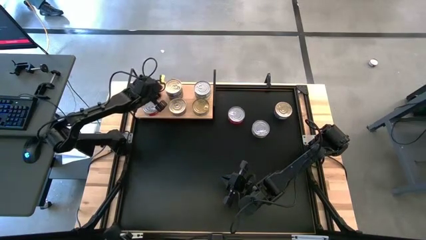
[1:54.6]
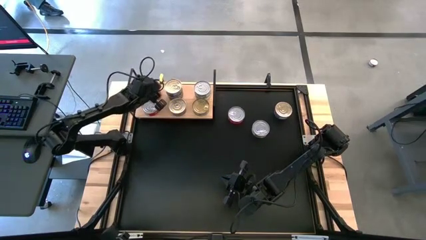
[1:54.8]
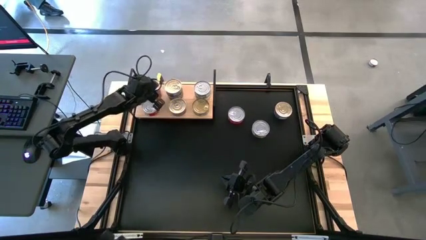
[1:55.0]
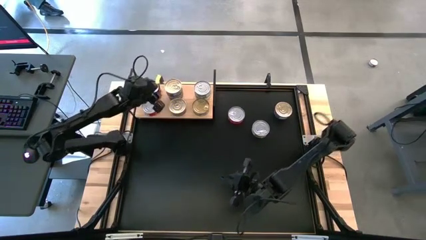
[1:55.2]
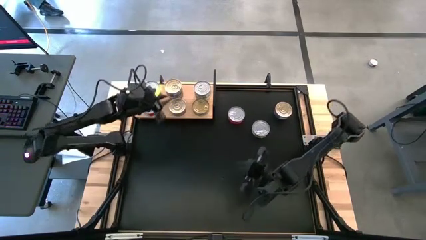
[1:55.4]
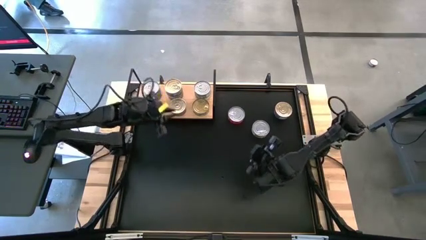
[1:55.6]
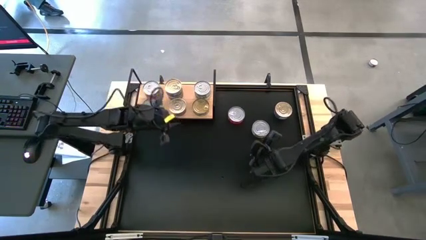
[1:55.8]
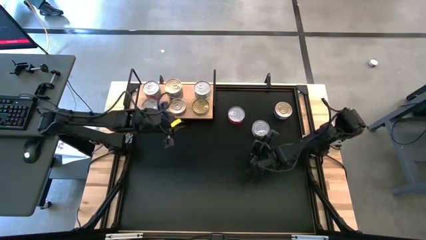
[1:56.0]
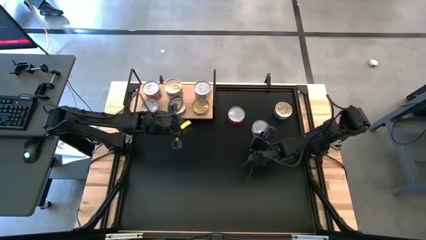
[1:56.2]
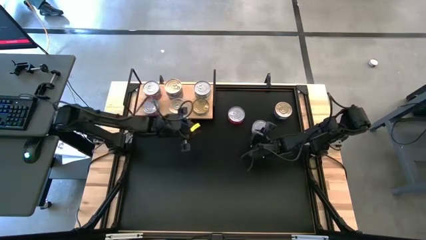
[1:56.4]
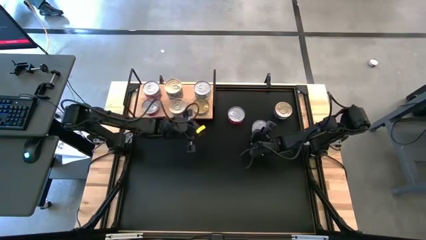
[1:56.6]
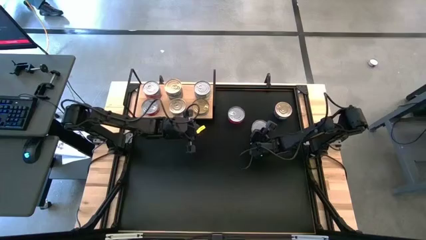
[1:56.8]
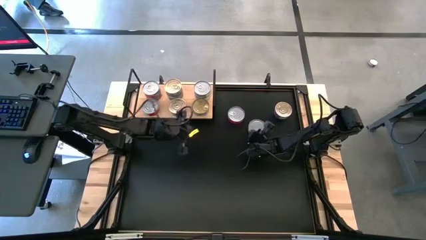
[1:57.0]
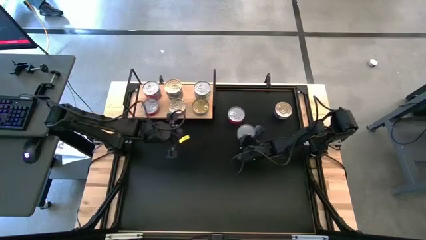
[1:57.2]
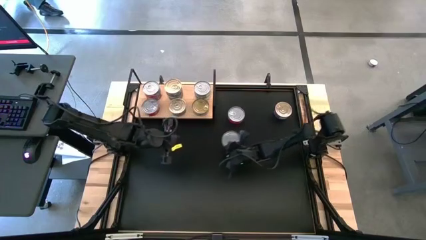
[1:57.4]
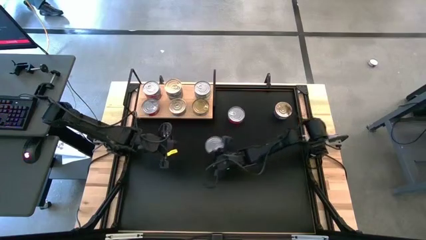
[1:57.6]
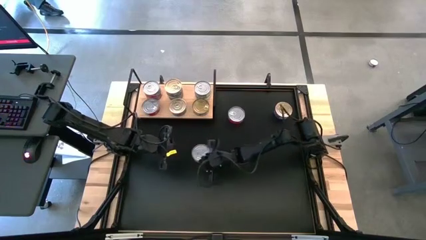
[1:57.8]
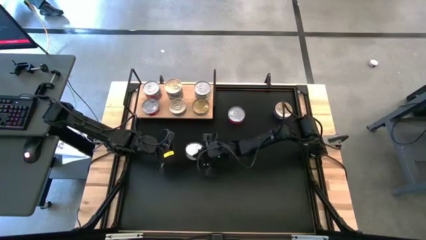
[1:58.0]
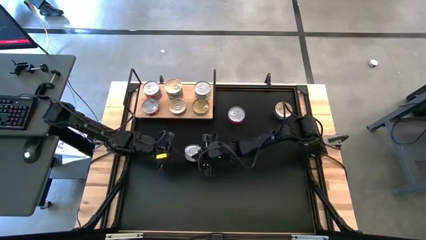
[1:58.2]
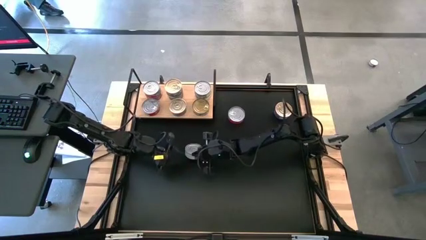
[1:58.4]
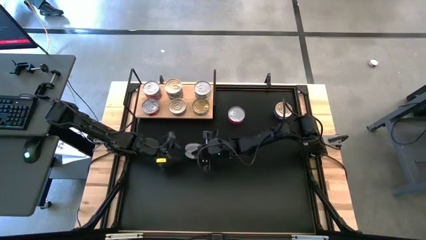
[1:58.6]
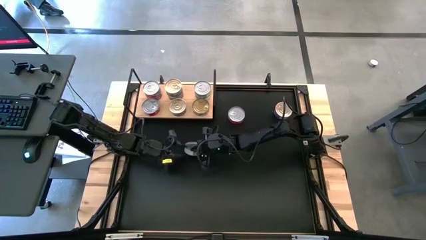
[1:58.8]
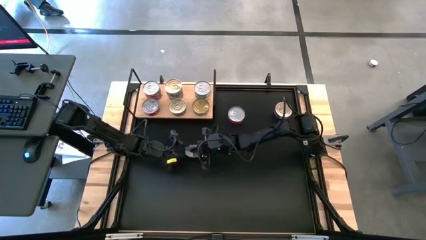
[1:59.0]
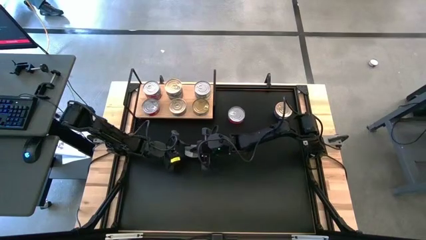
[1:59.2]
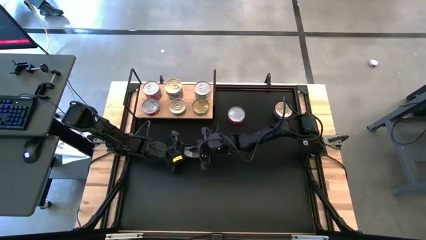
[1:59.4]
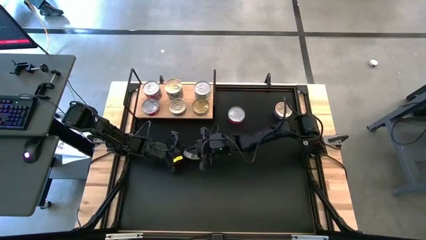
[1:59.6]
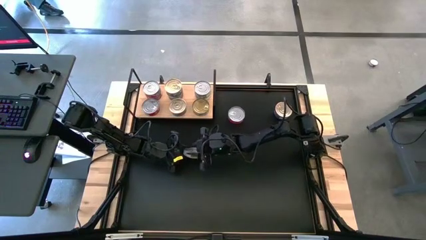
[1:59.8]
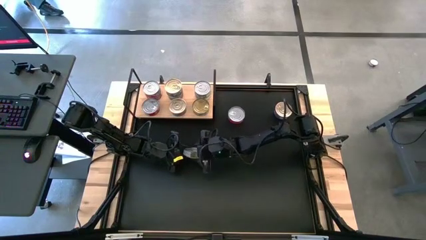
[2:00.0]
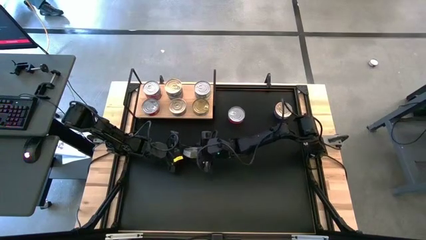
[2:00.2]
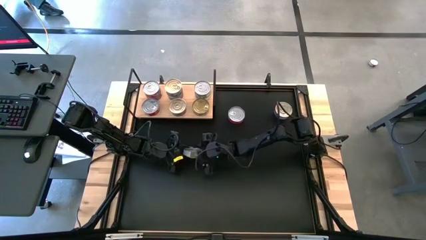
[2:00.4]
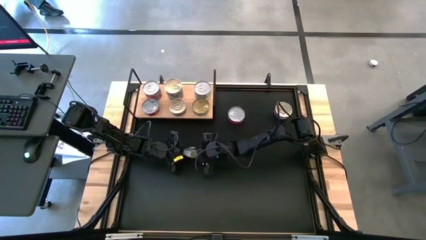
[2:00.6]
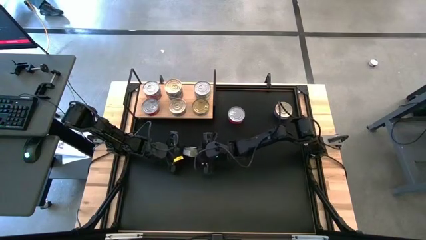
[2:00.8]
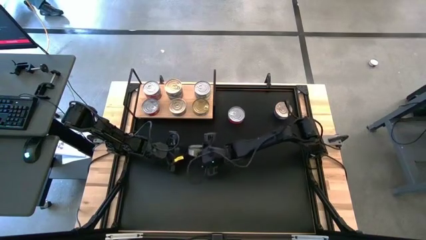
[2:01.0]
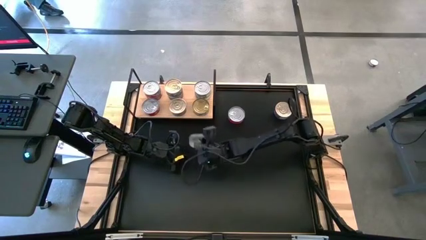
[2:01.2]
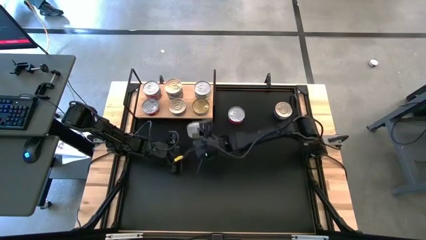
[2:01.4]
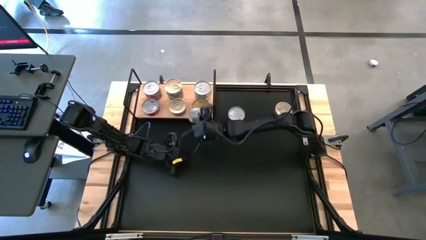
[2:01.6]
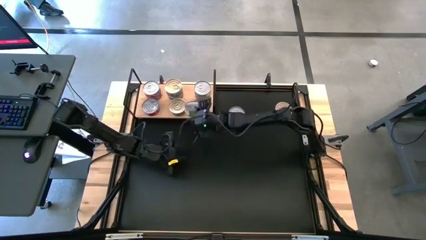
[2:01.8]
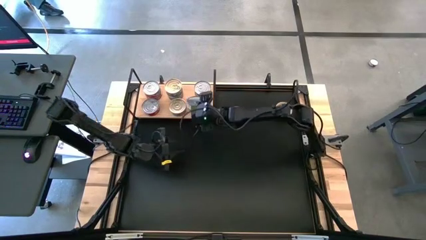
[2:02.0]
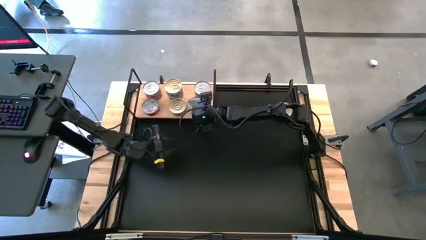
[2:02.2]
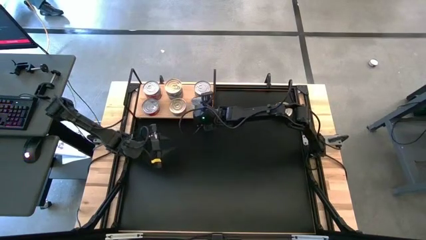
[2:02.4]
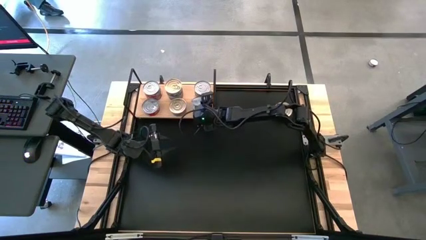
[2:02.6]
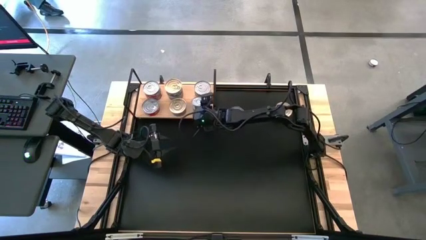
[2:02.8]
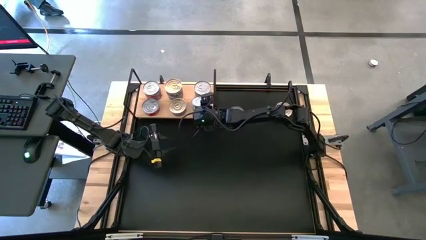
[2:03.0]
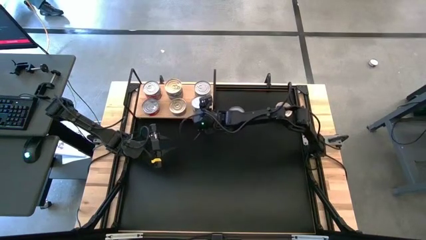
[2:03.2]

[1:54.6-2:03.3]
Task: Stack canned seafood by type on shelf
Stack the green tuna can on the top of the other green tuna can

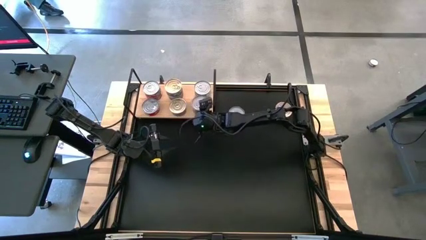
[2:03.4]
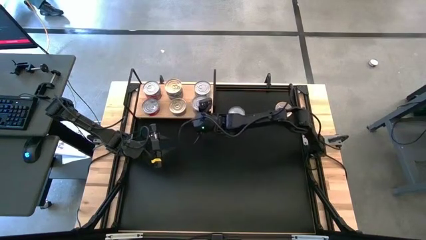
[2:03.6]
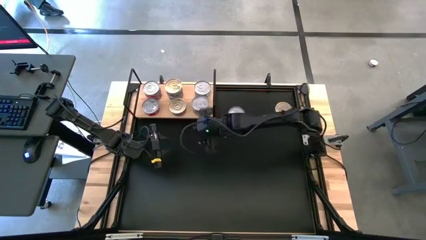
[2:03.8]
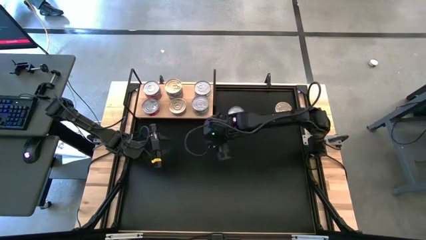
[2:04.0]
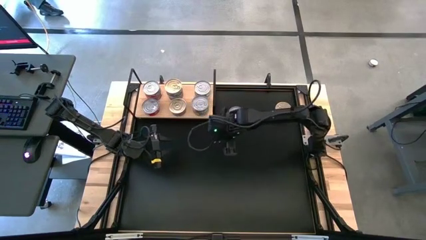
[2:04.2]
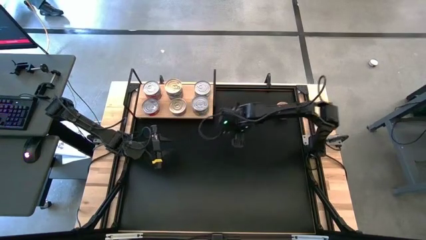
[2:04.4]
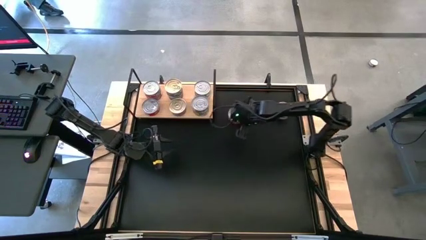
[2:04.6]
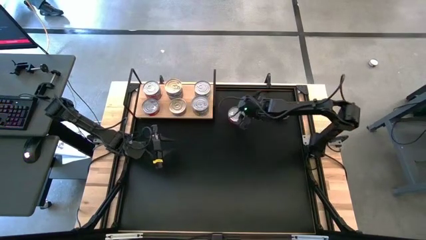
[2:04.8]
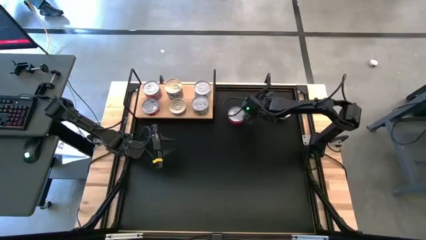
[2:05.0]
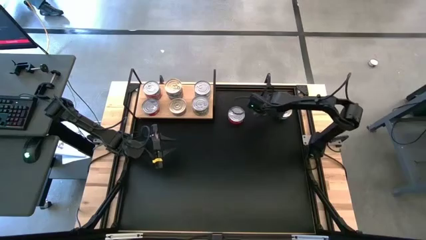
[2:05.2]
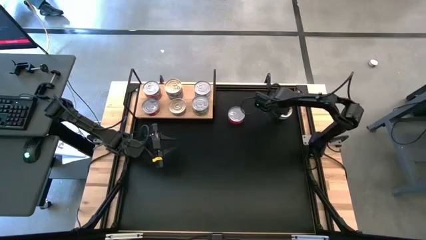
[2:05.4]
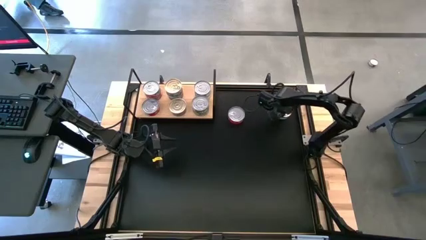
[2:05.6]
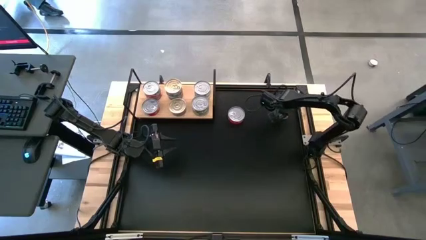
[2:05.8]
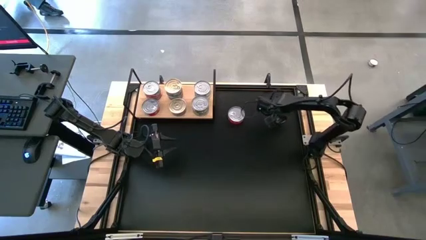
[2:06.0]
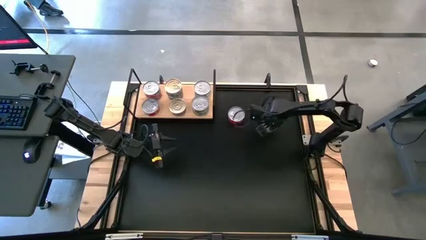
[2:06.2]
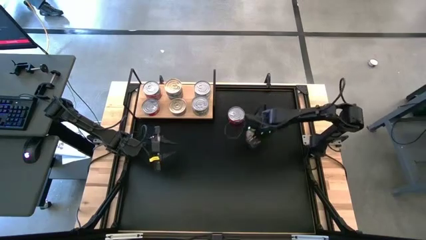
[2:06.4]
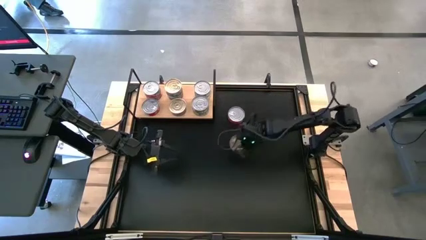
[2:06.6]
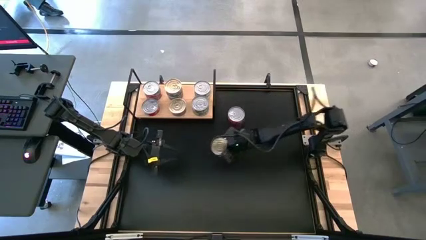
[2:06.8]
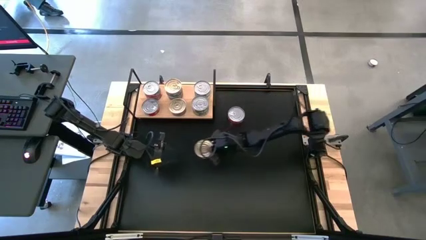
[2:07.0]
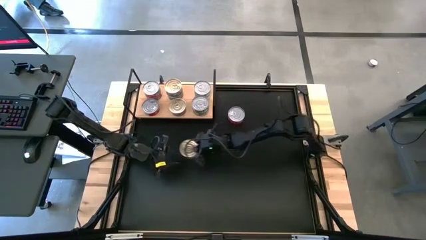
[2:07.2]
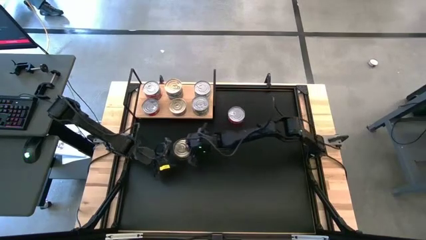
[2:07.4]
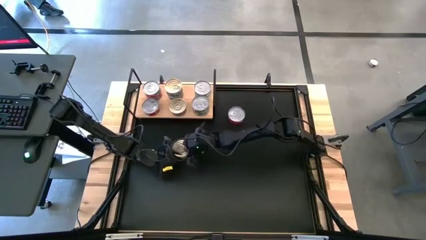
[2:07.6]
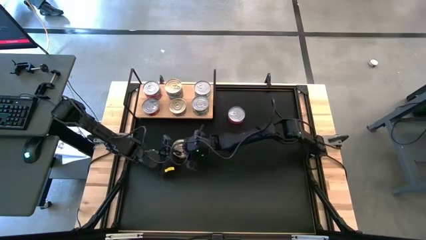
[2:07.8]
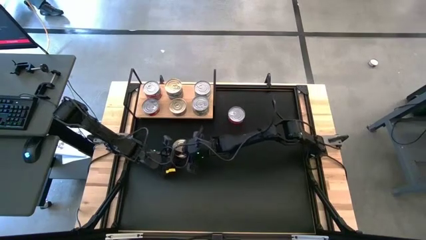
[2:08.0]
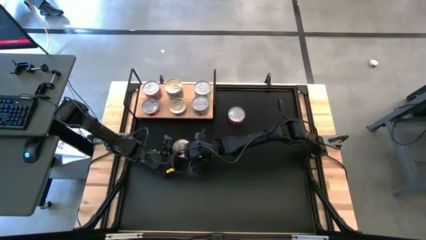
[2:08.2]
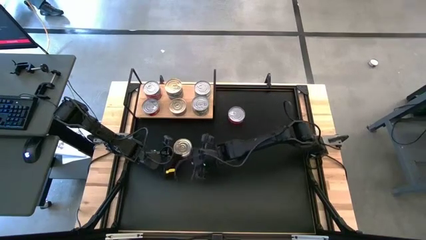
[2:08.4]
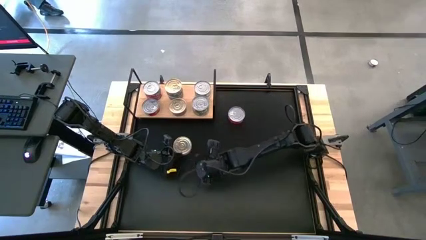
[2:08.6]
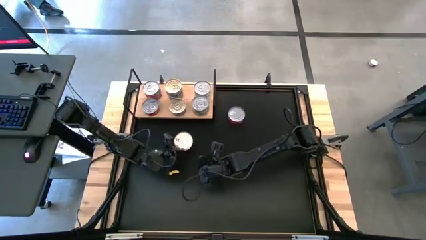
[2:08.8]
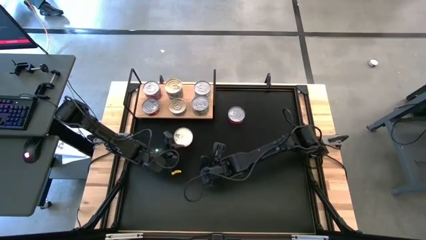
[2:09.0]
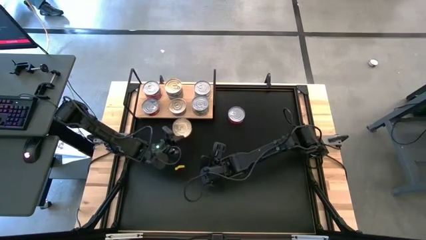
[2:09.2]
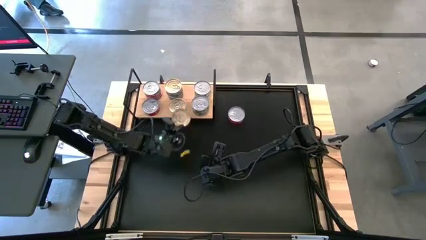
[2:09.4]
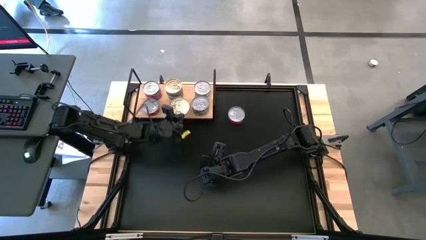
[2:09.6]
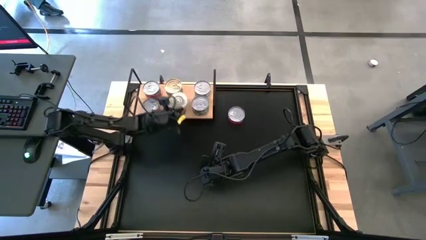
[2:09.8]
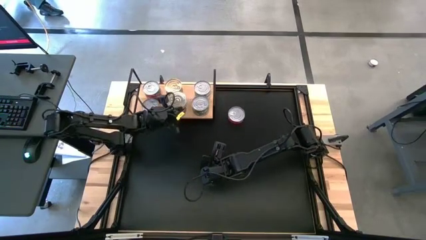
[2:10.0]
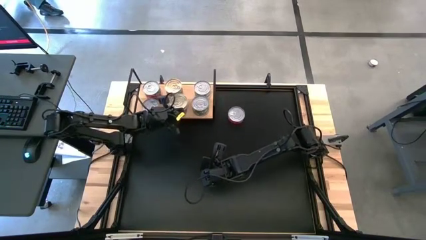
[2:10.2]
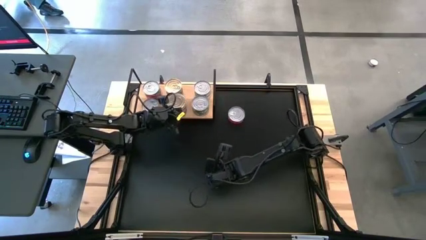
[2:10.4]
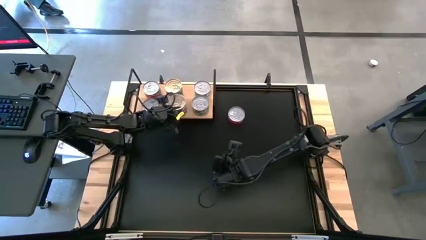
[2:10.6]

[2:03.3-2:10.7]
Stack the pink blue tuna can on the top of the other pink blue tuna can
